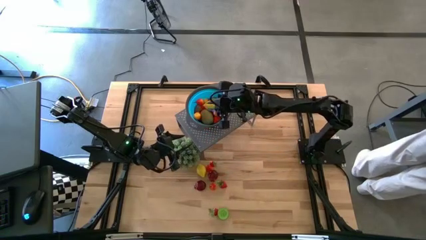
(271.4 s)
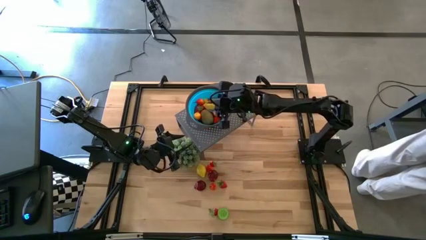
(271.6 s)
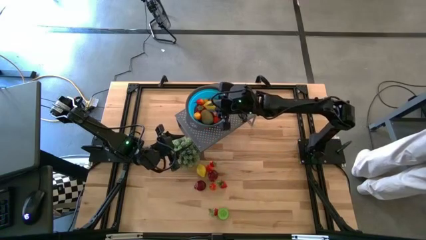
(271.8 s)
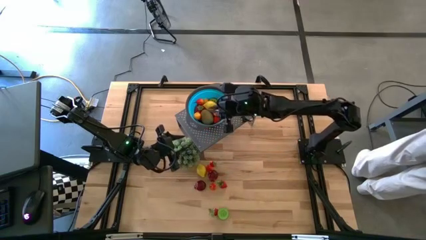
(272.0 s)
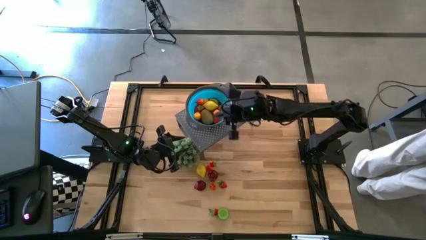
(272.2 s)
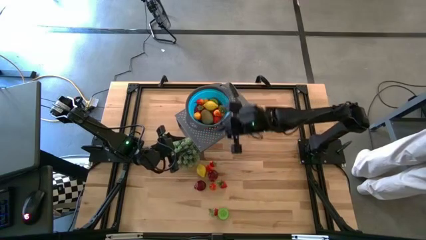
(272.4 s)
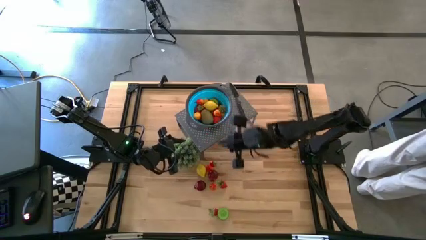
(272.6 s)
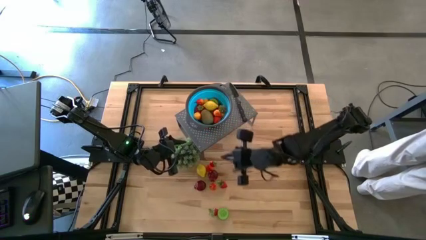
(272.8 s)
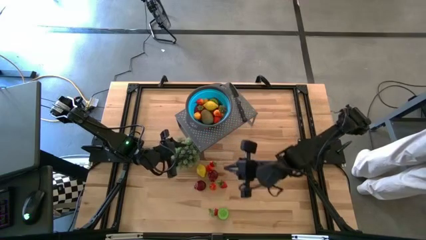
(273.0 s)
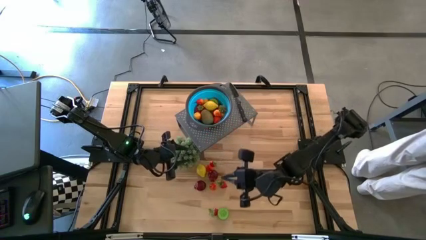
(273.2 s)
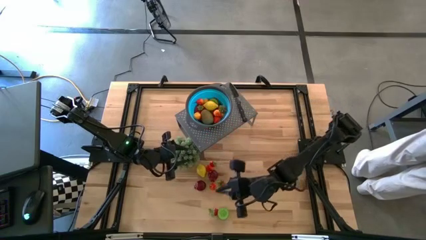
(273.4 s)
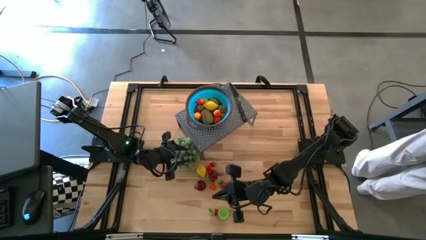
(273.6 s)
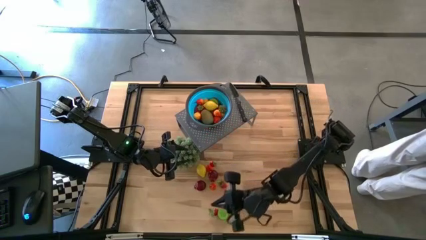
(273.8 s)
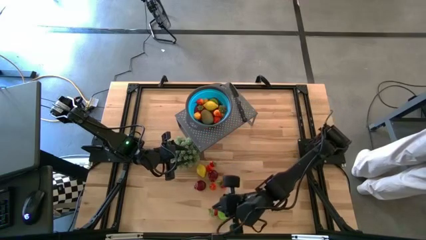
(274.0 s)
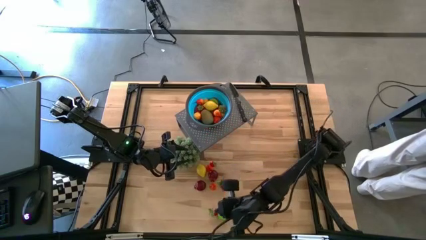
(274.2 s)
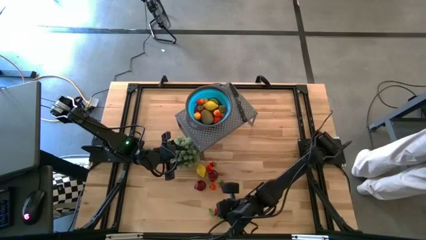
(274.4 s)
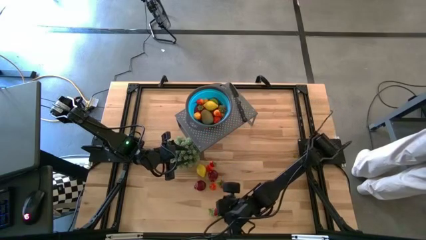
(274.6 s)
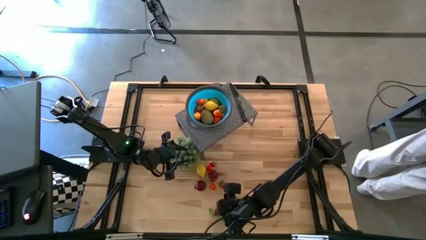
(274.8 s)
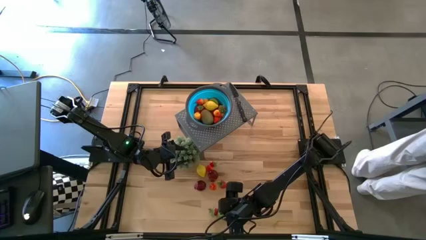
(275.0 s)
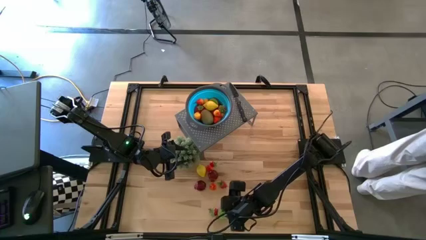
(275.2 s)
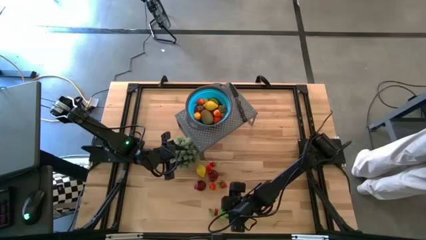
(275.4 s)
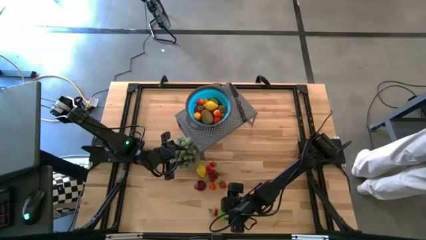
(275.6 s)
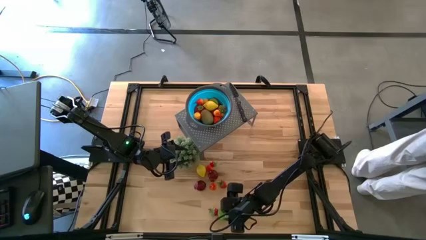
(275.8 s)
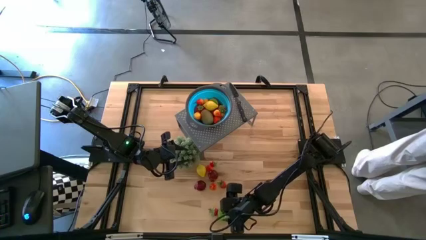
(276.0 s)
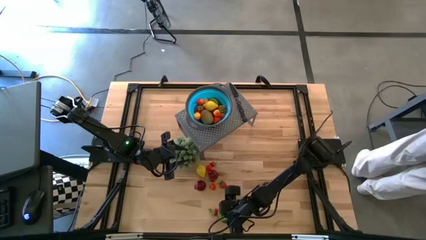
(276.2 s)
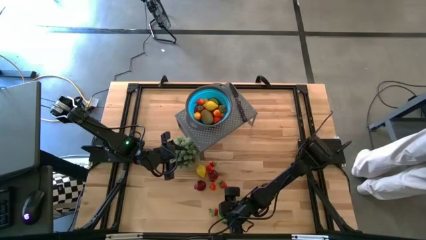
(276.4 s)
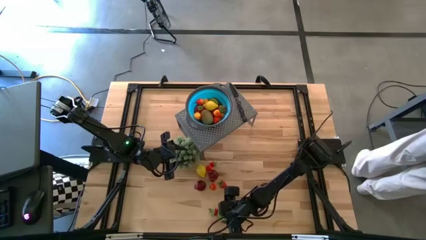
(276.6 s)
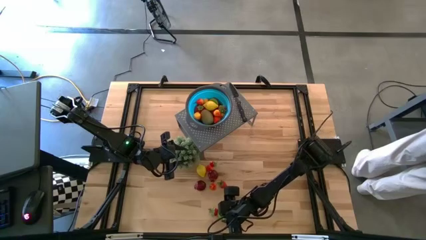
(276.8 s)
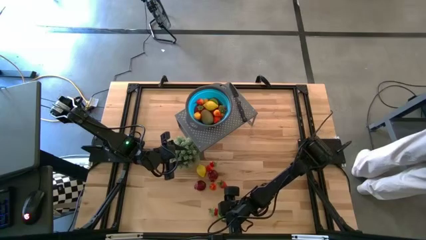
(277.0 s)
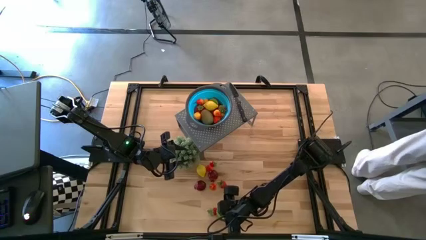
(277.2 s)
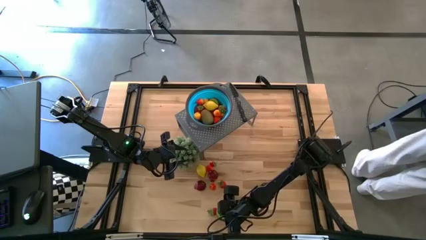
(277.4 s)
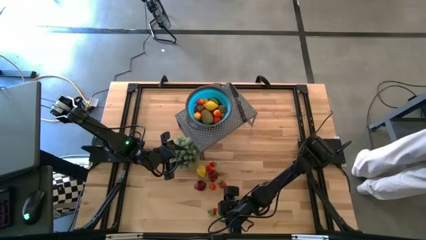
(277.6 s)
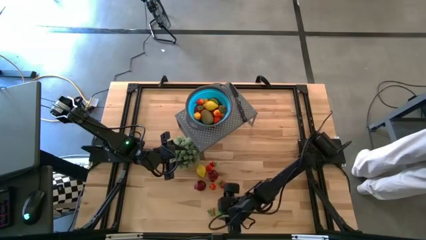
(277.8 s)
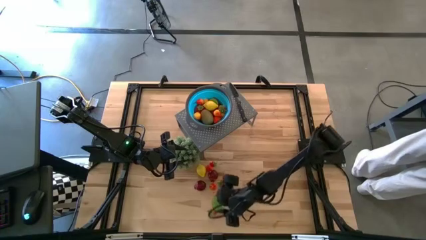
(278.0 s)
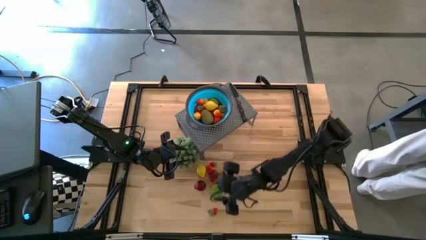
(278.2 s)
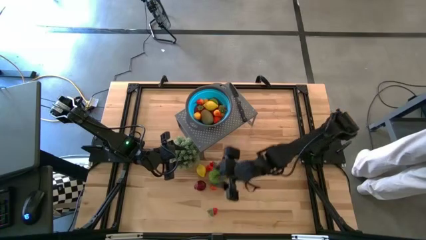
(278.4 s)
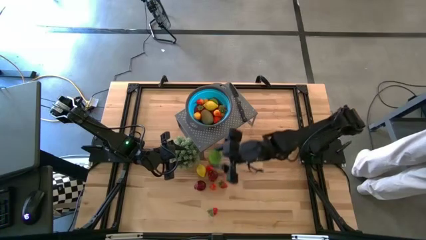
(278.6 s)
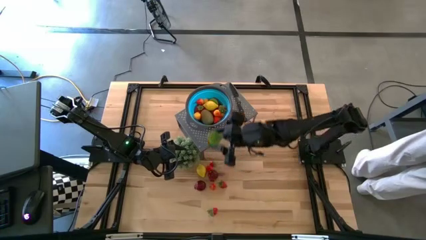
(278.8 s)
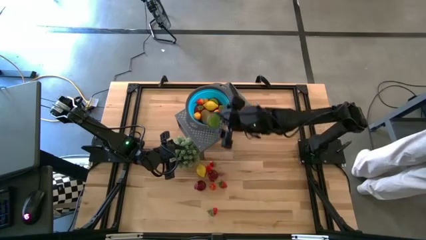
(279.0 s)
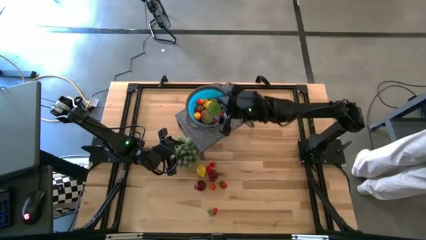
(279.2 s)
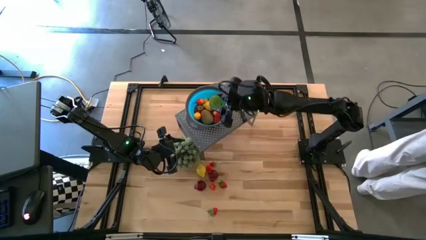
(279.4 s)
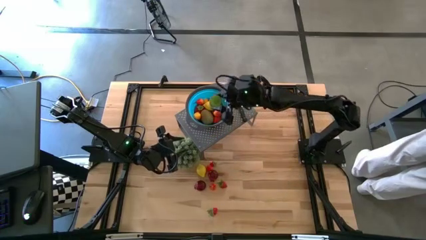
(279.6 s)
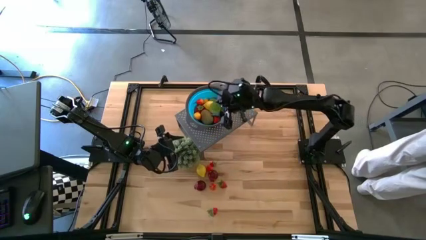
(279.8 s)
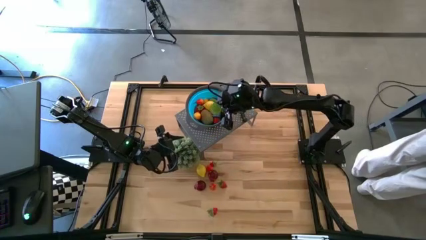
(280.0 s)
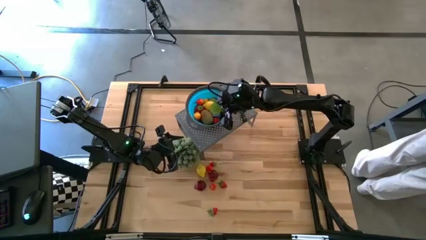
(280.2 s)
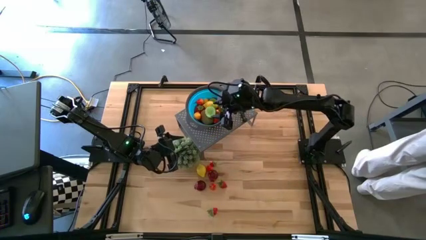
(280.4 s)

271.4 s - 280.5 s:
Task: Pick & Place Fruit
Put the kiwi into the blue strainer bowl on the shelf
